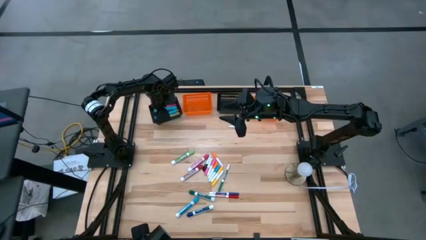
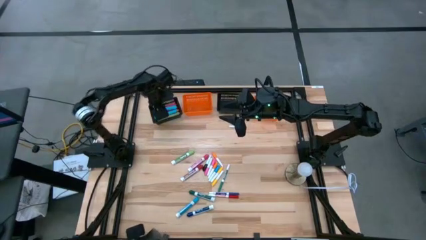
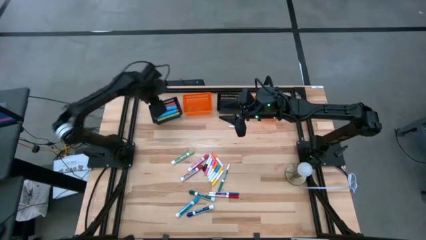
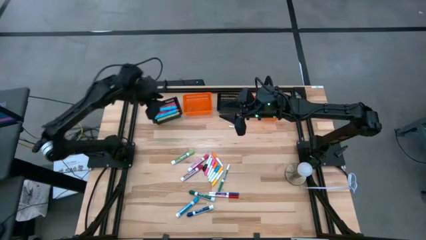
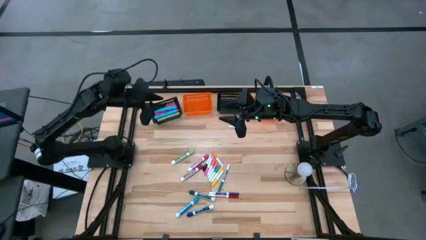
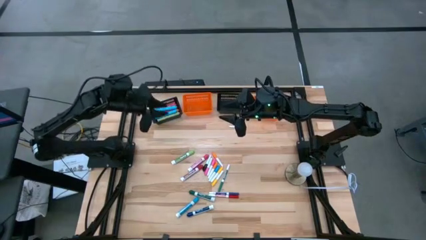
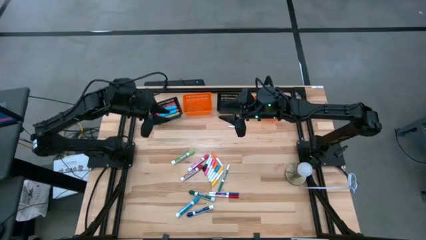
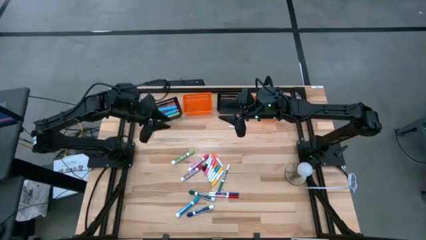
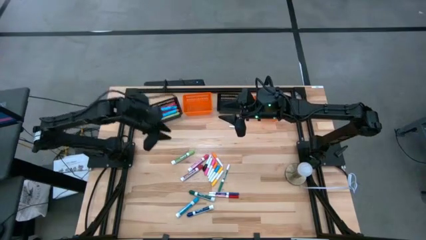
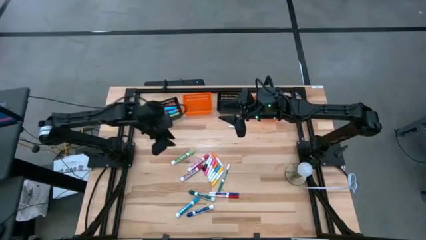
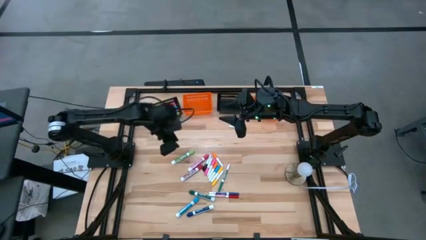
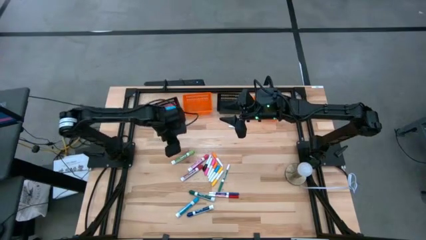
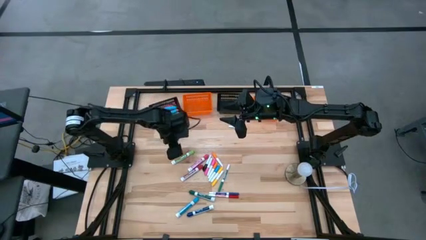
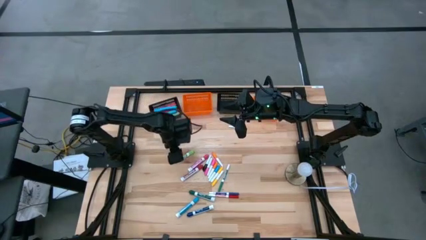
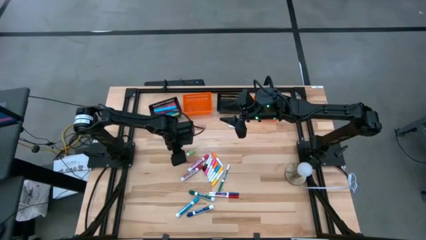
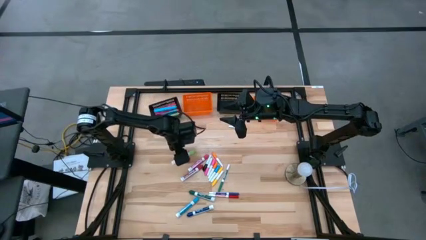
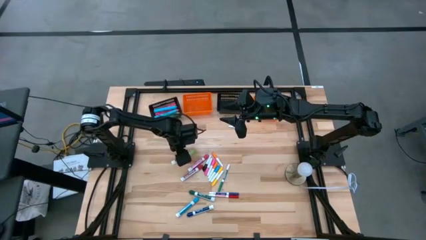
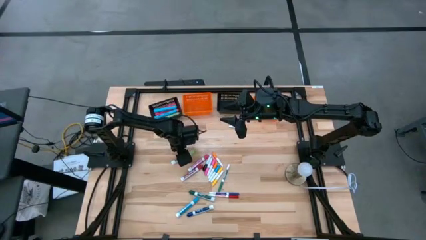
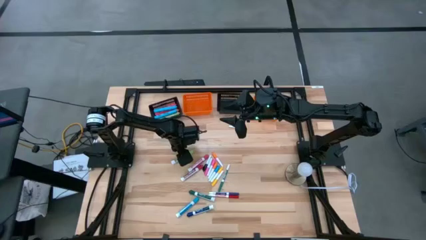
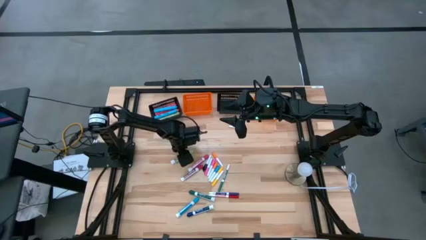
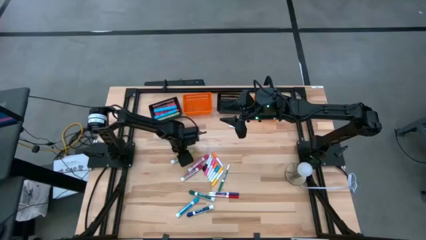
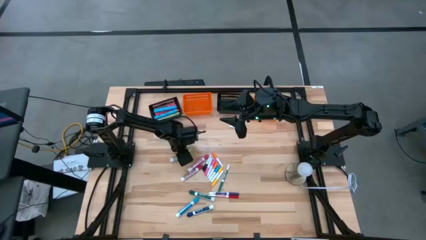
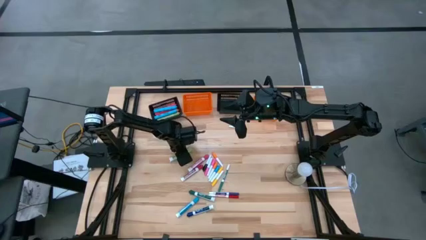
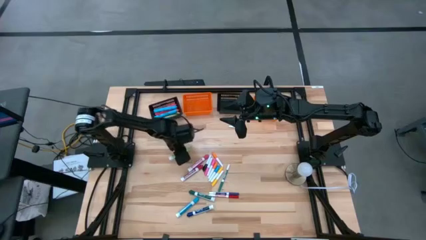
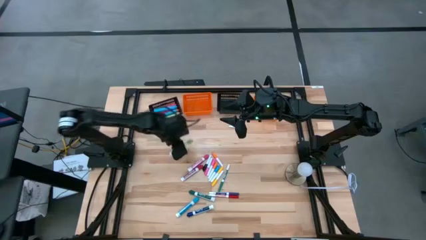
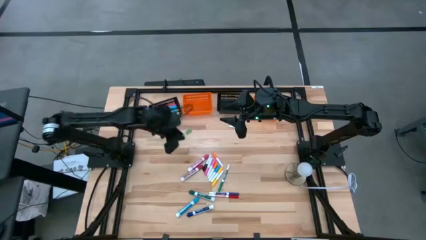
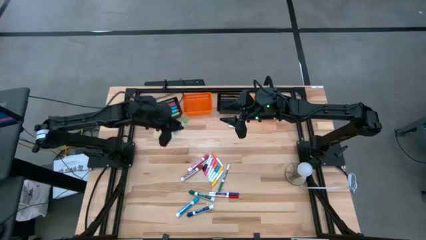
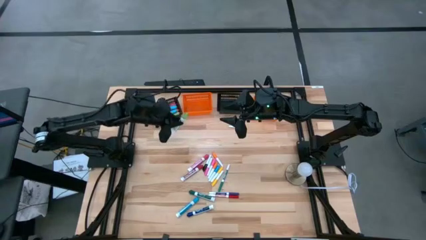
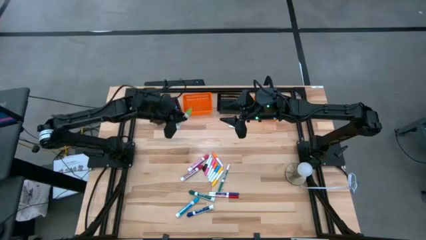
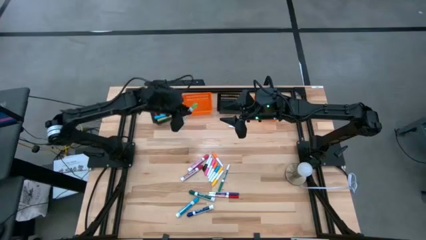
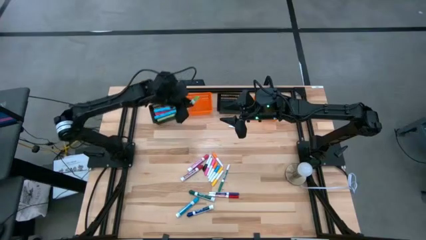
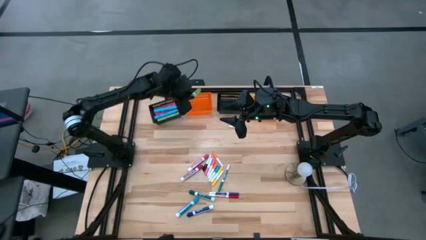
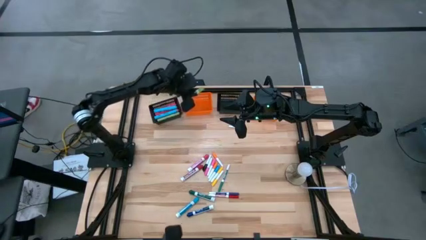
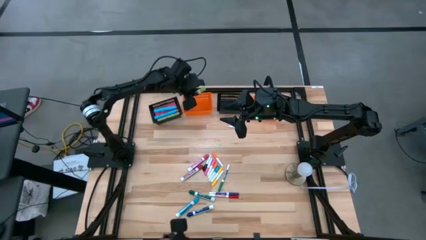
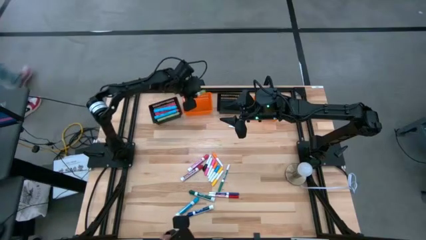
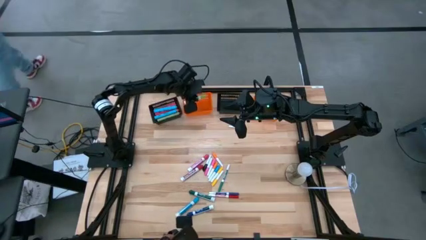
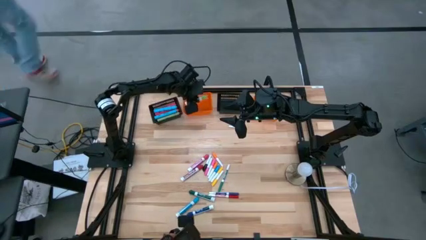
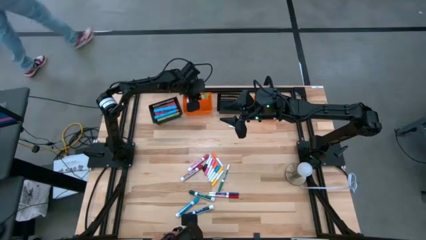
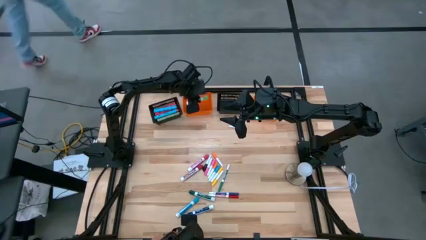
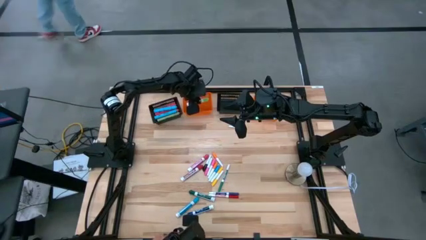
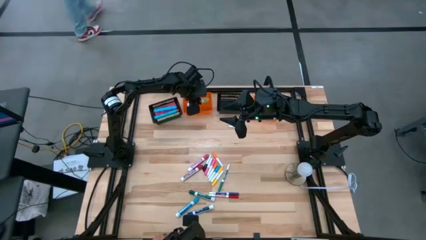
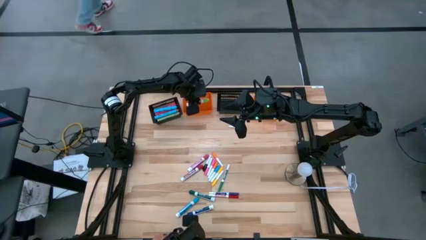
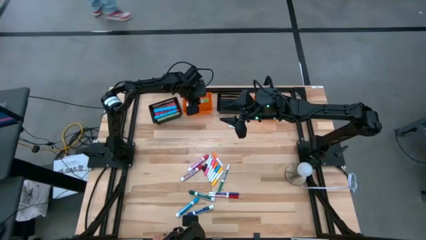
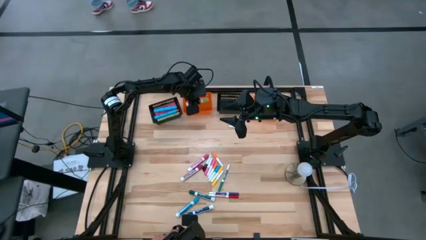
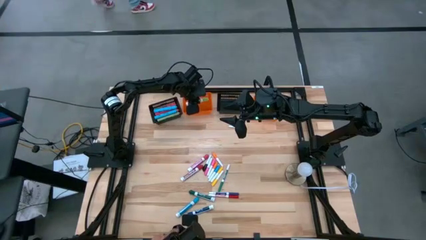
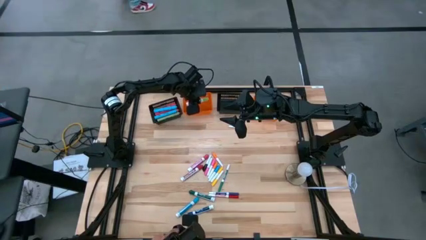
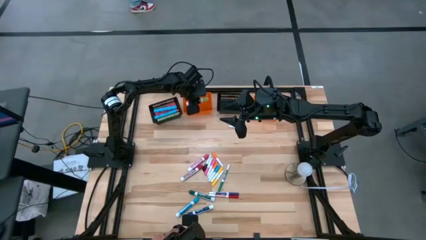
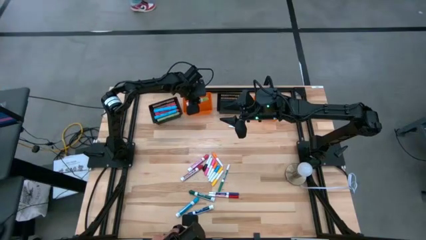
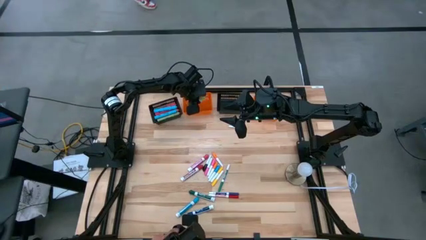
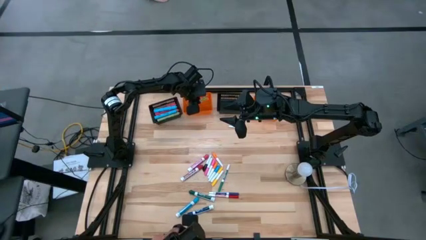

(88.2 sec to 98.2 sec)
Task: Pick & Place Markers
Put the light green marker pen into the left orange bin

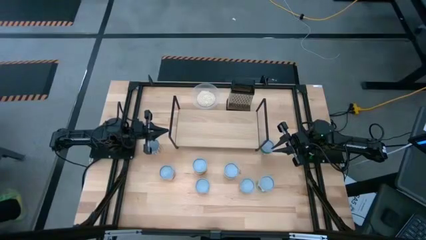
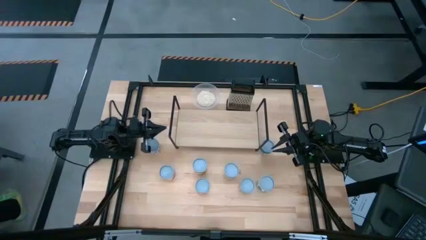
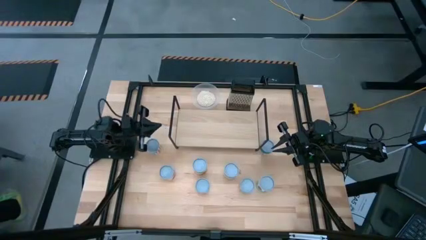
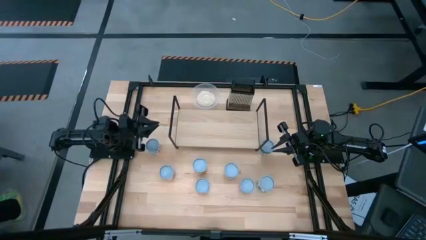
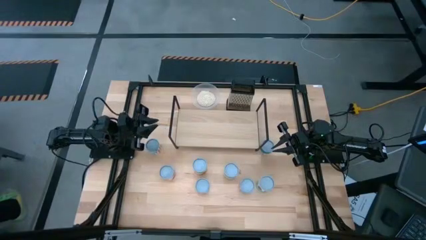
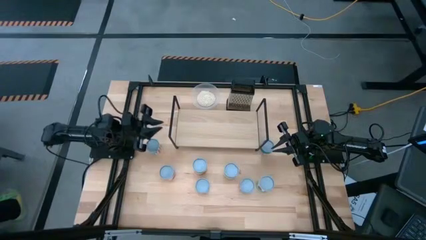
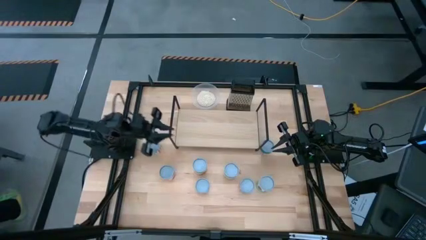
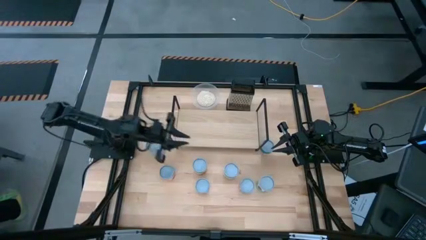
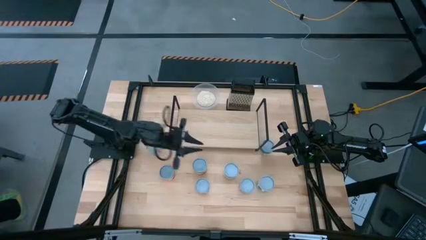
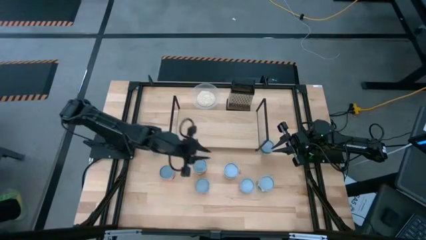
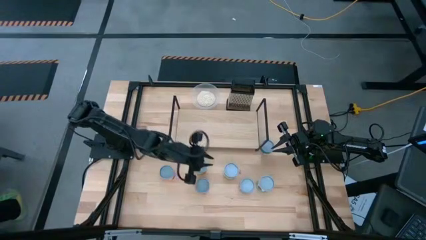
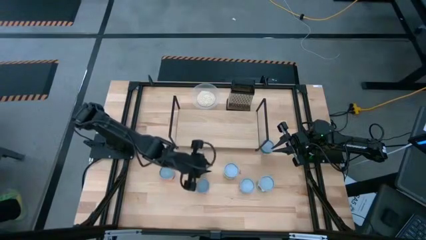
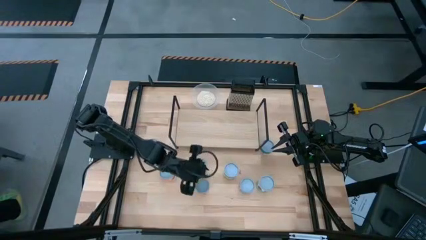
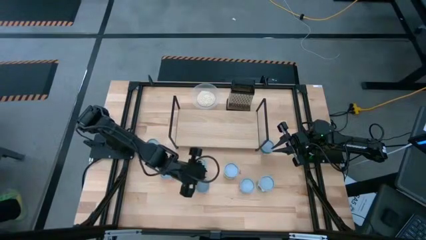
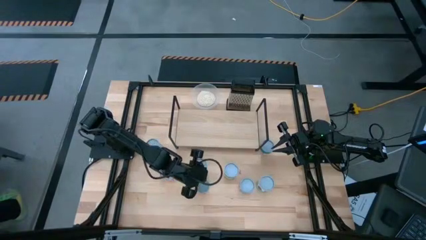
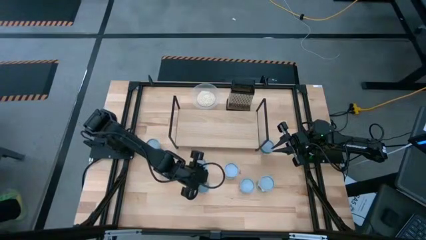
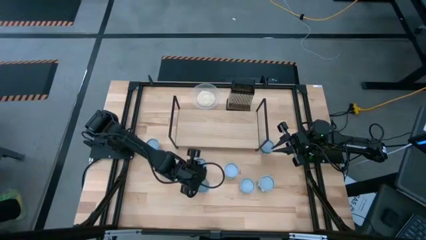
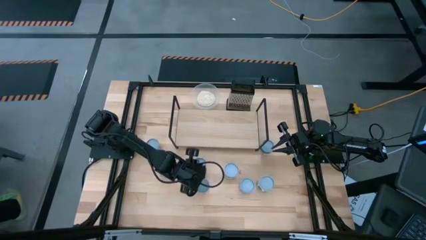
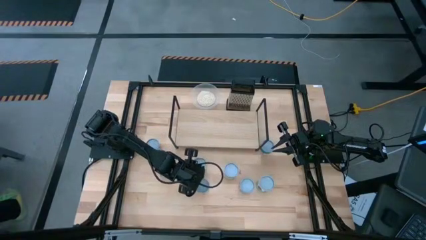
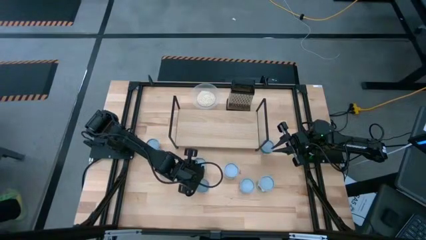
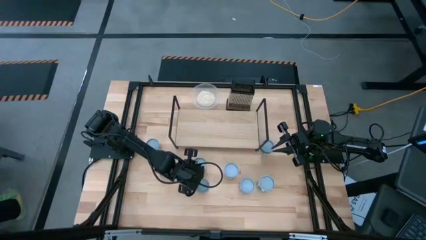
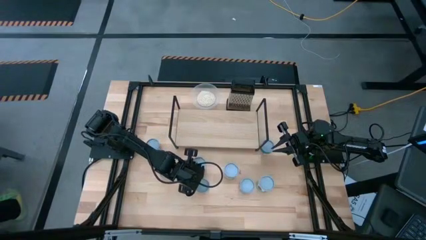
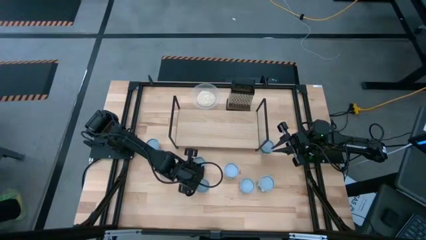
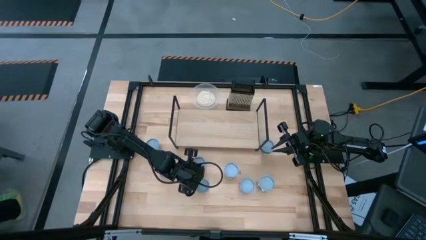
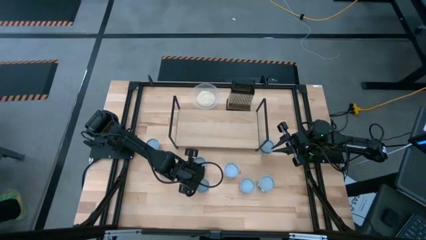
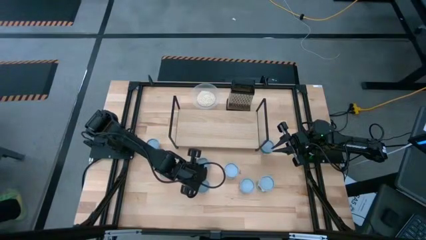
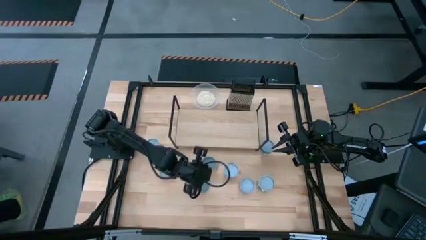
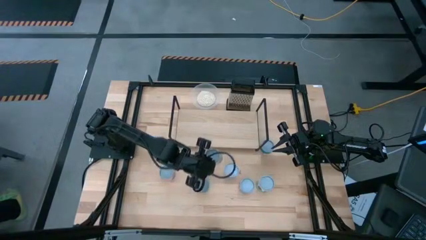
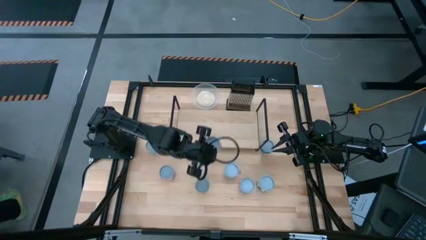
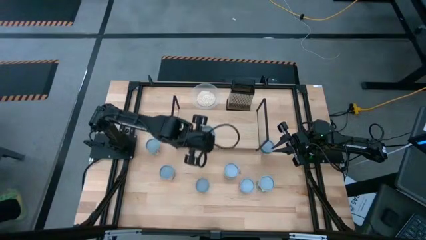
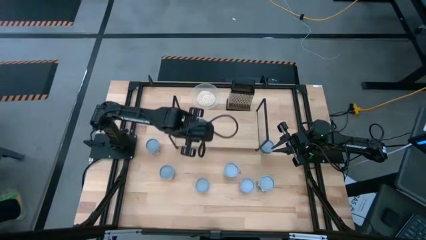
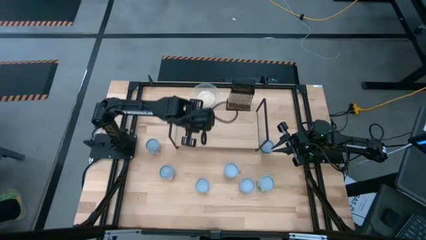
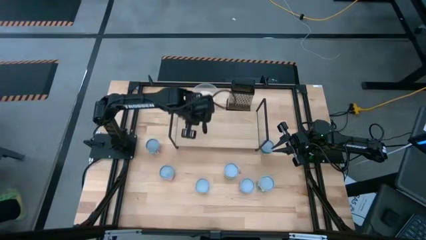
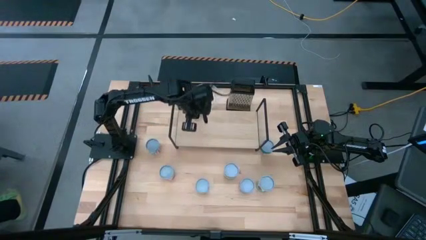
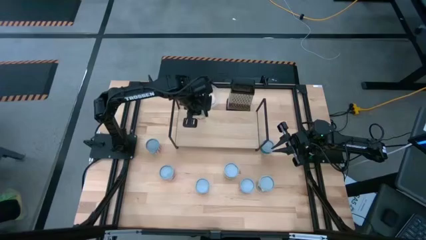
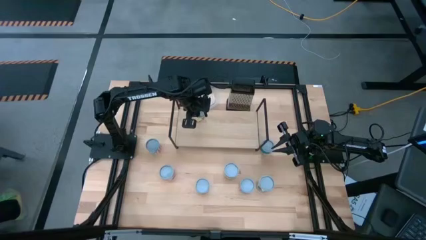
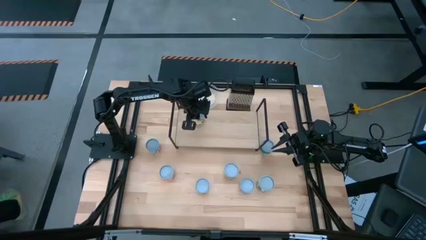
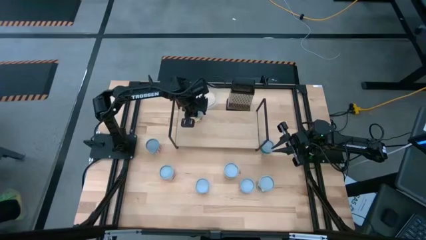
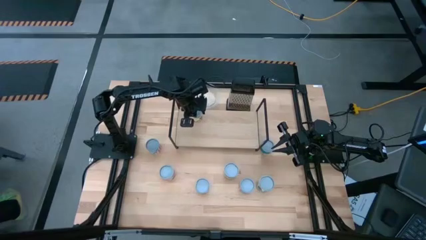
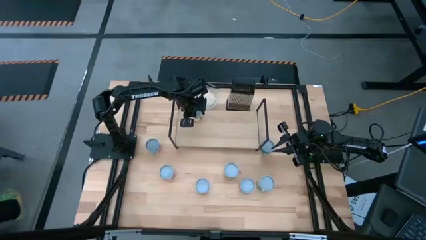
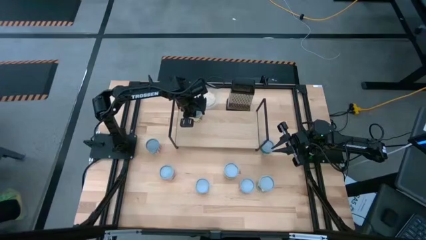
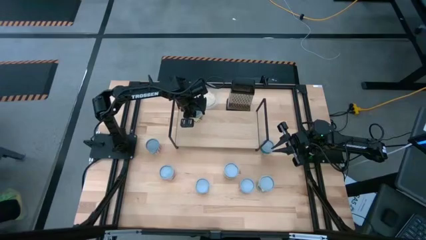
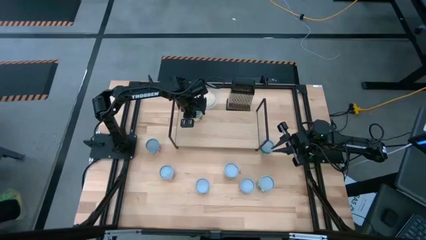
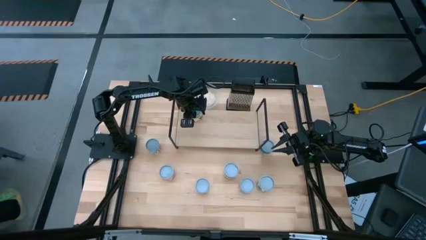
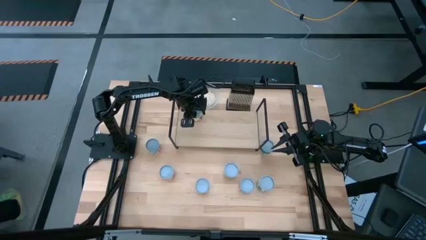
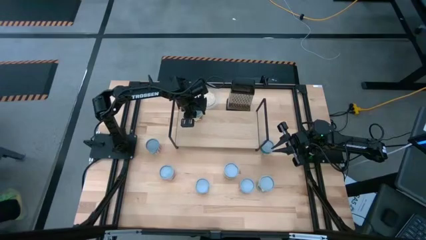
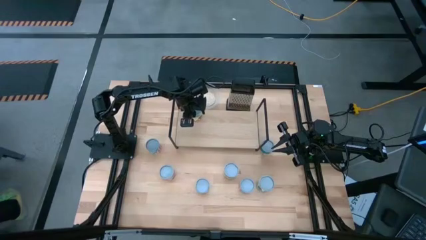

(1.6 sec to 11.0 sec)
Task: Pick and place cans onto a shelf
Put the canned spaghetti sauce on the shelf
